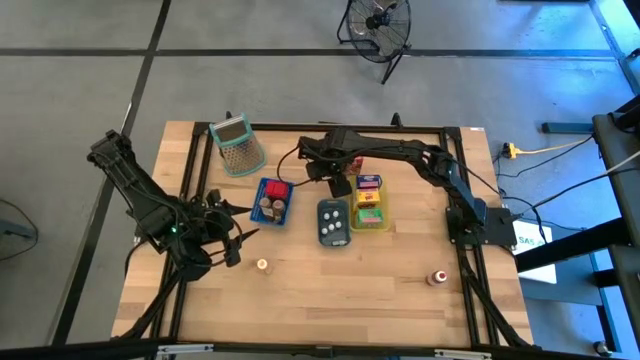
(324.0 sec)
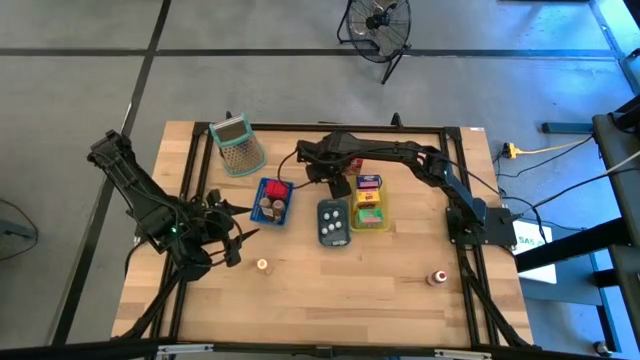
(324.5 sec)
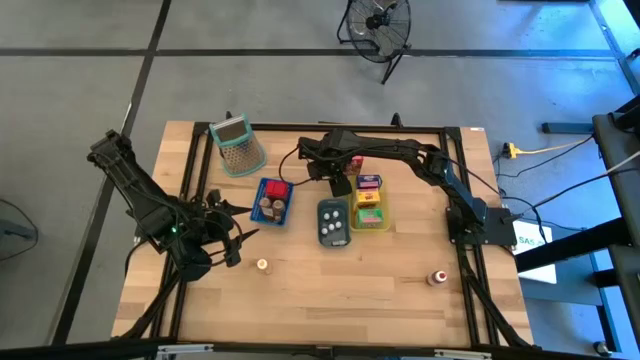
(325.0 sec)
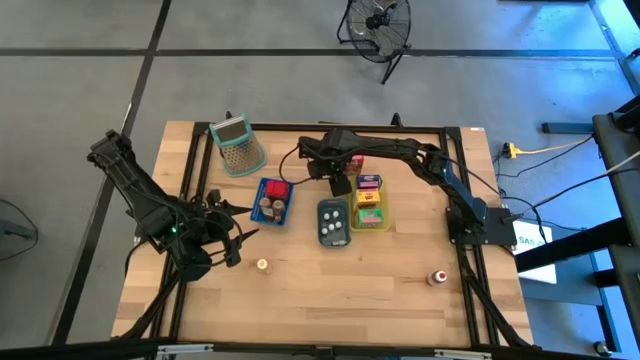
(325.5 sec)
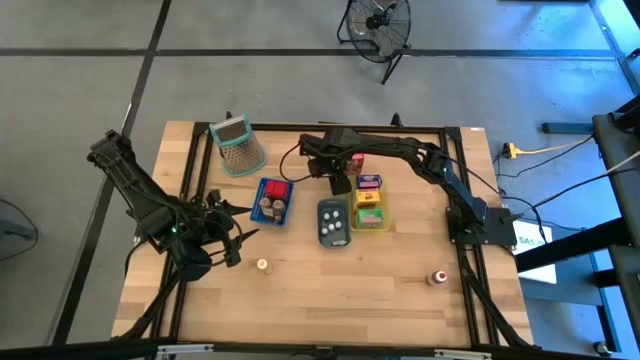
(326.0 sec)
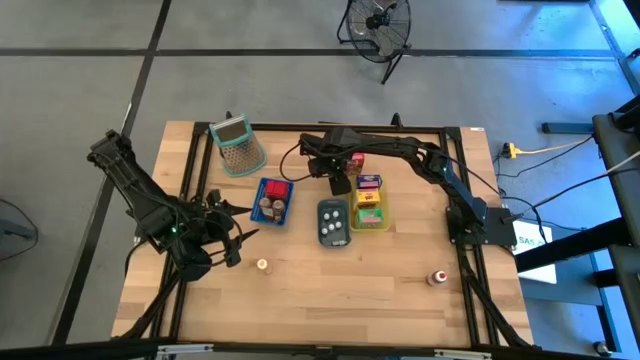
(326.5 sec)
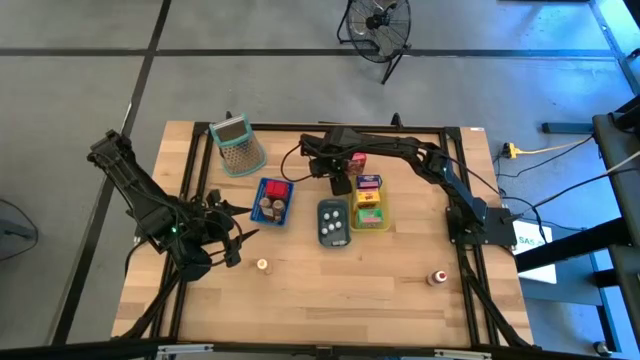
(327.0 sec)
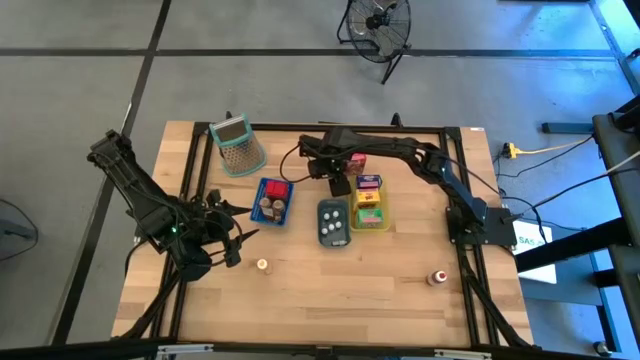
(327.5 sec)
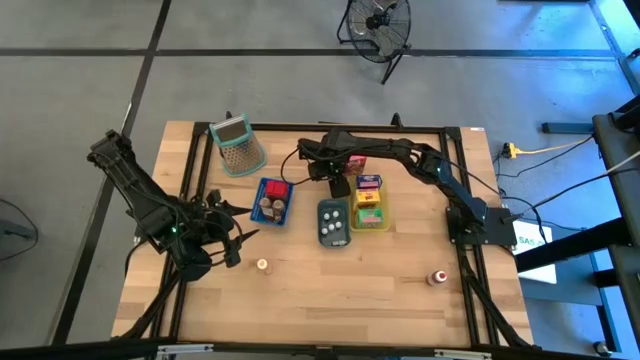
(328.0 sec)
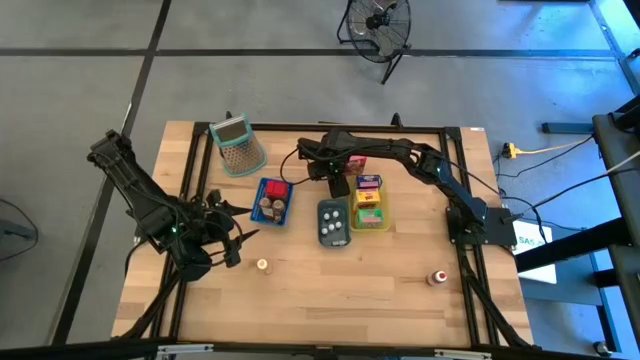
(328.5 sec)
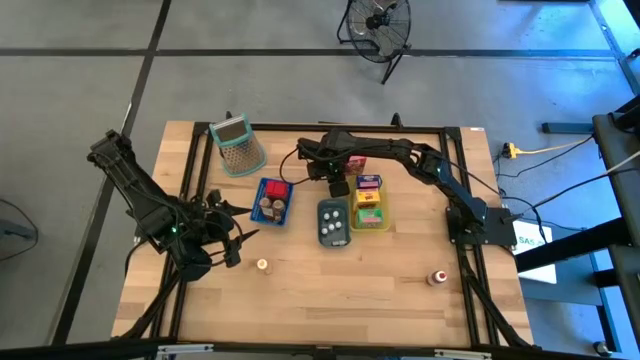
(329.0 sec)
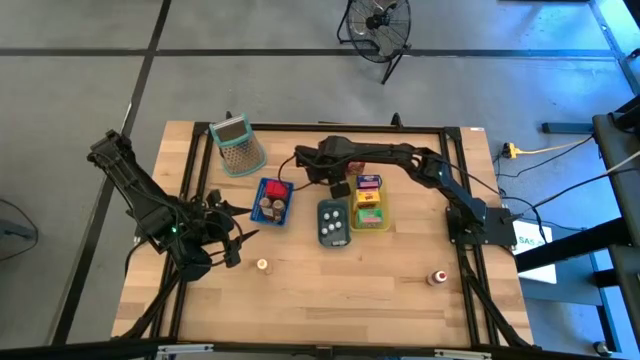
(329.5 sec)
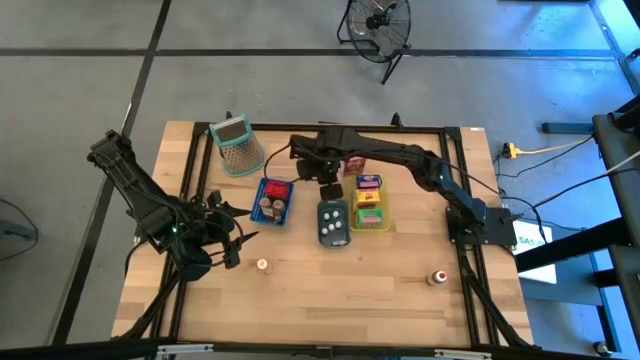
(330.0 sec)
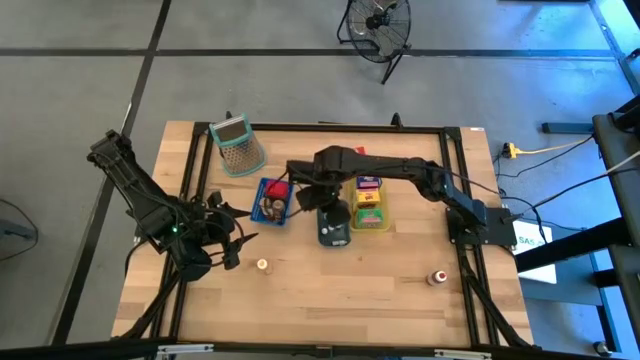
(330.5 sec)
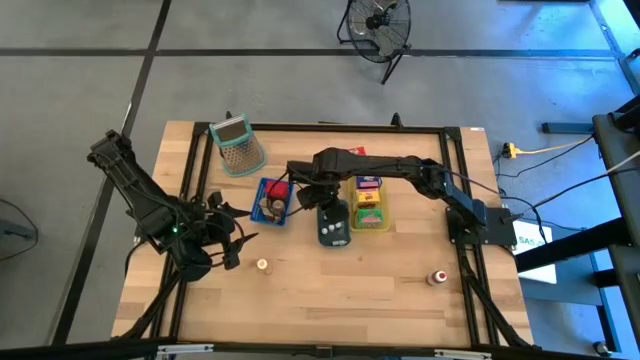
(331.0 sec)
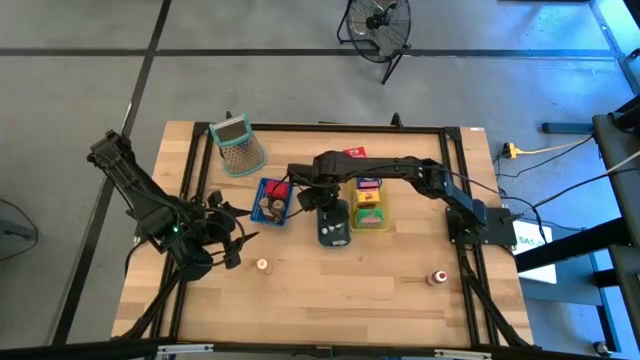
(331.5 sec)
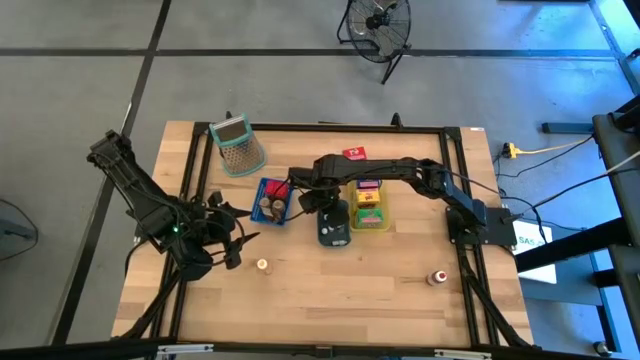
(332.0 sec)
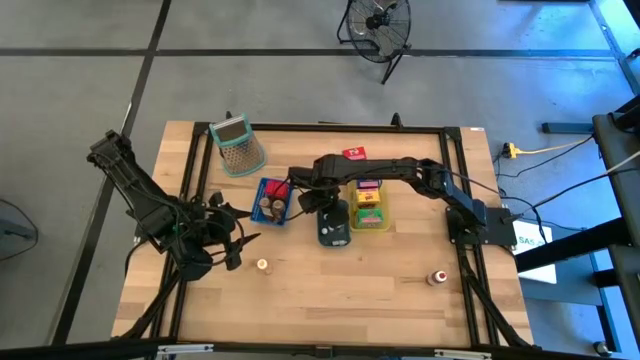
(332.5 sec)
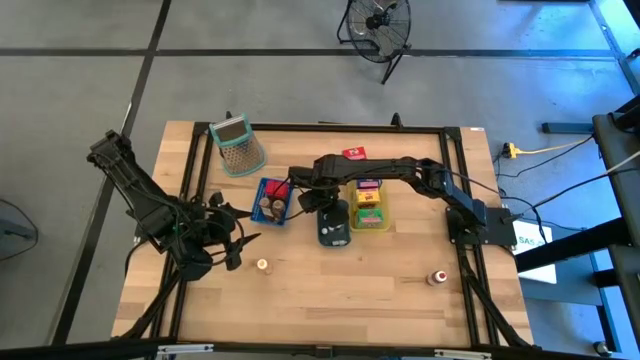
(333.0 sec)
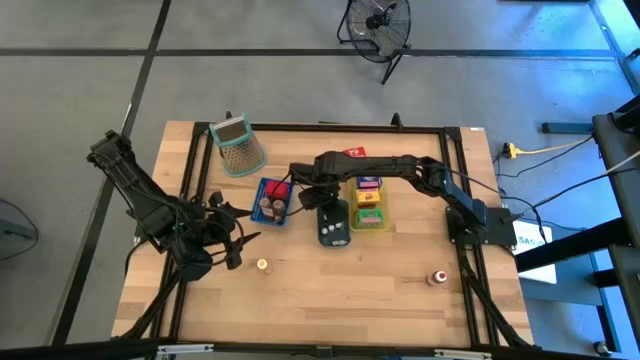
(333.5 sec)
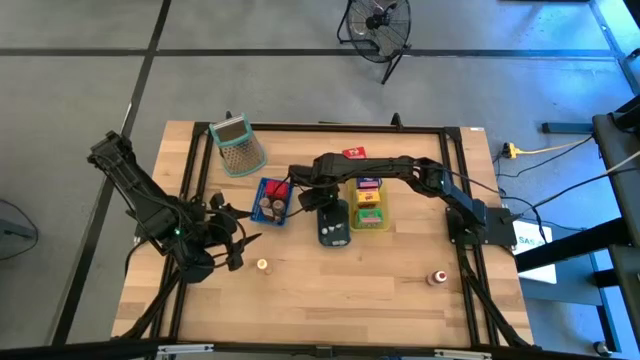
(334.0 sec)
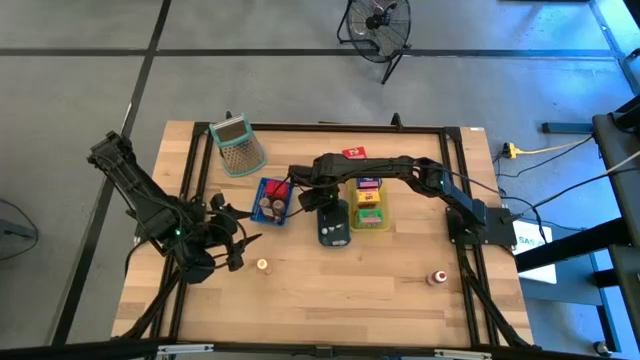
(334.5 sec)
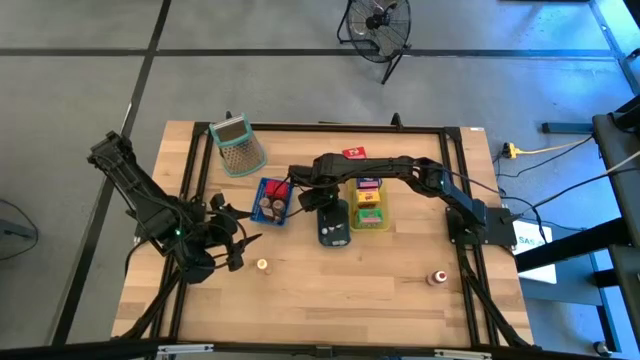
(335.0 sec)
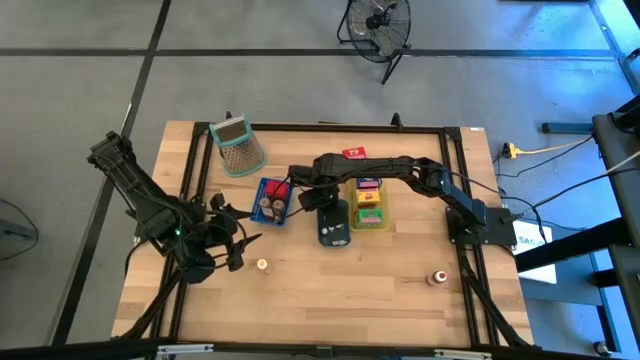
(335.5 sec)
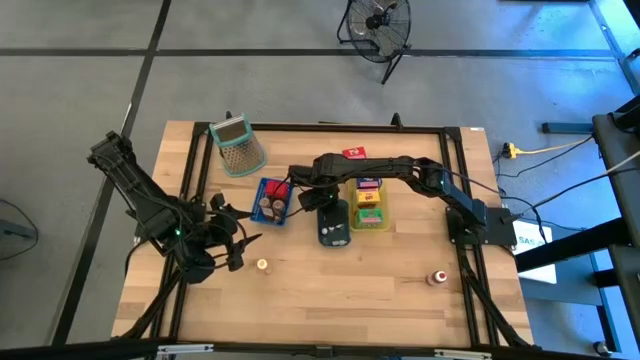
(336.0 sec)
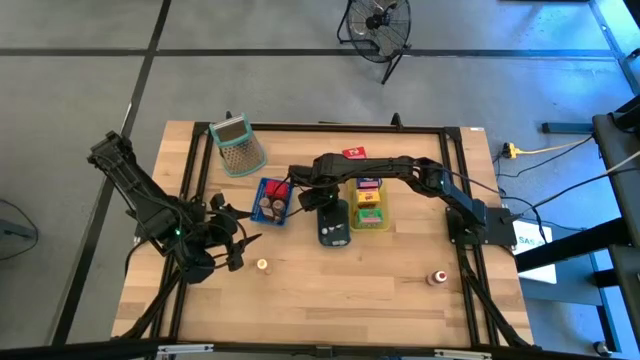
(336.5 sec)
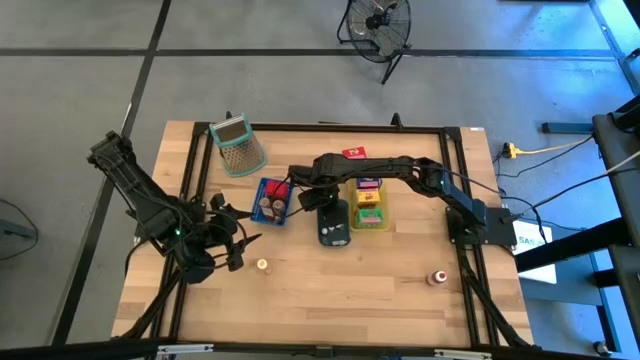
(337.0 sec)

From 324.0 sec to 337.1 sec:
Task: Pick & Place Kitchen Items
Put the small black food coloring into the green bin

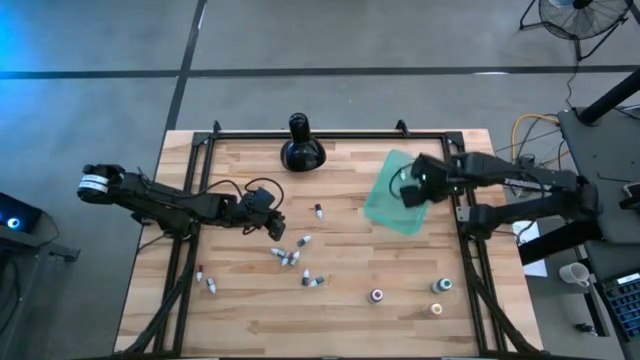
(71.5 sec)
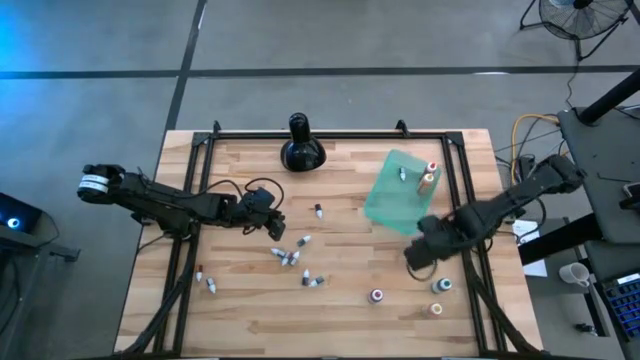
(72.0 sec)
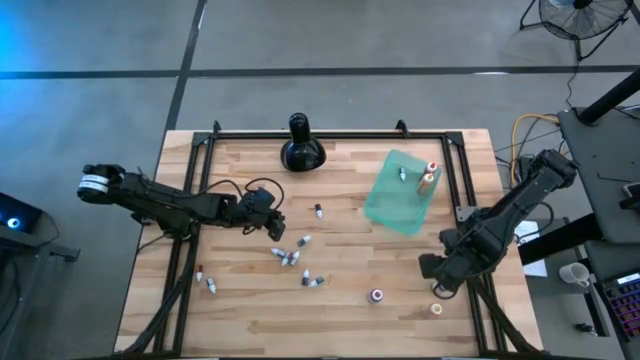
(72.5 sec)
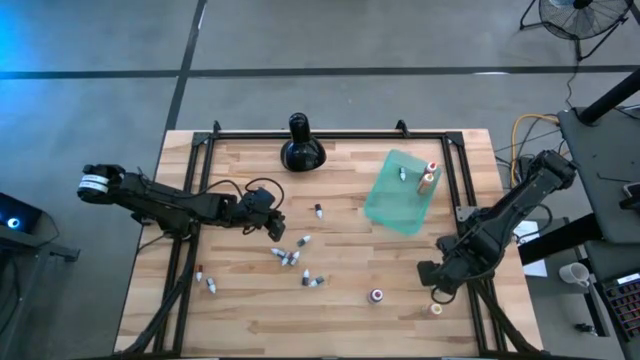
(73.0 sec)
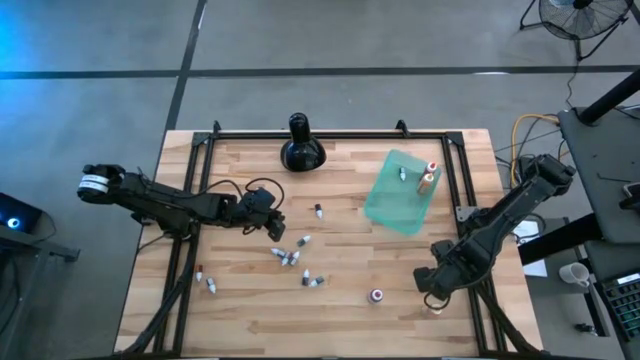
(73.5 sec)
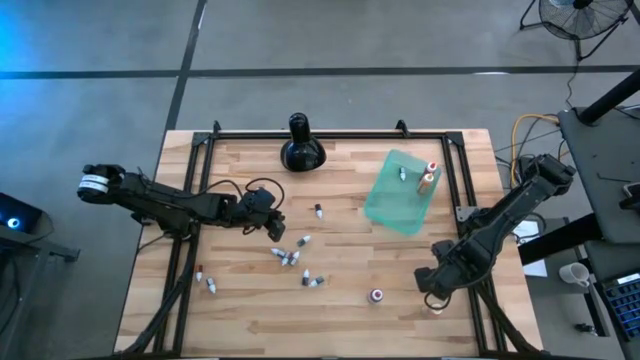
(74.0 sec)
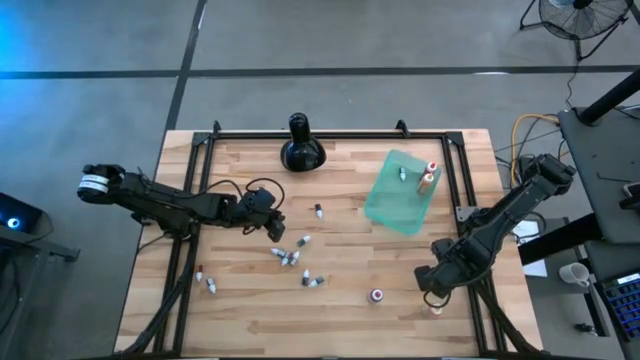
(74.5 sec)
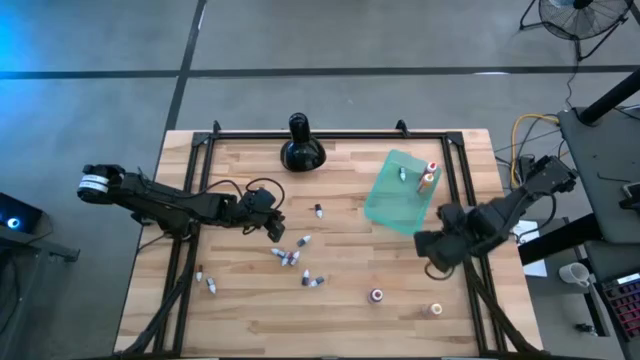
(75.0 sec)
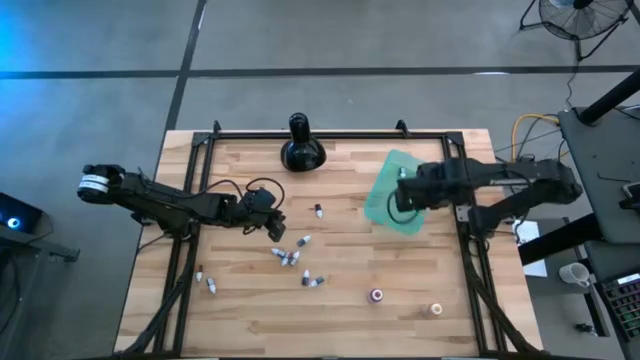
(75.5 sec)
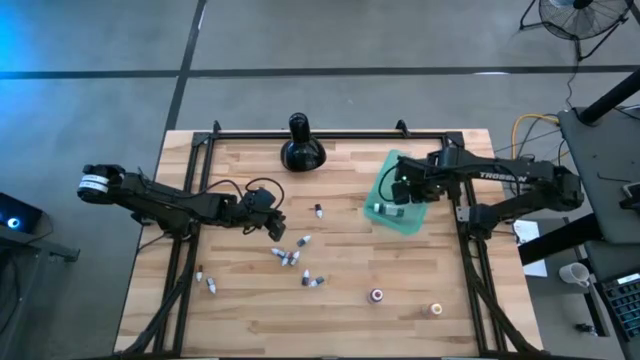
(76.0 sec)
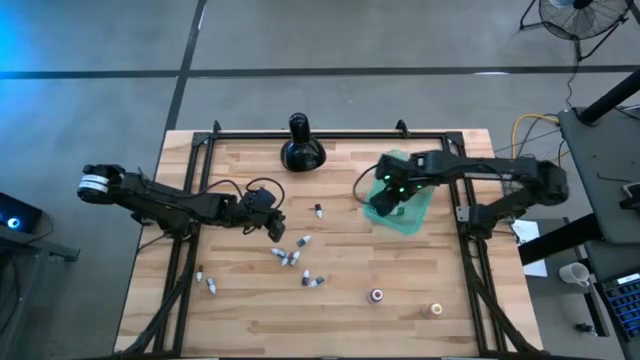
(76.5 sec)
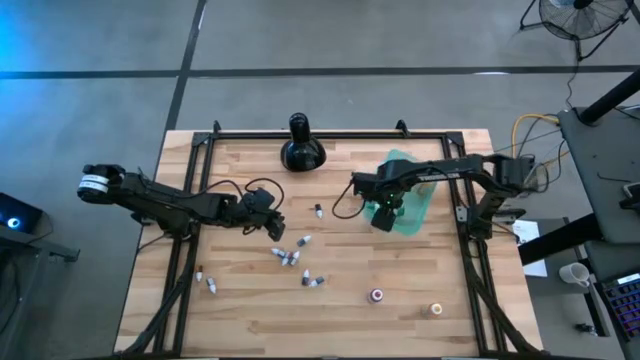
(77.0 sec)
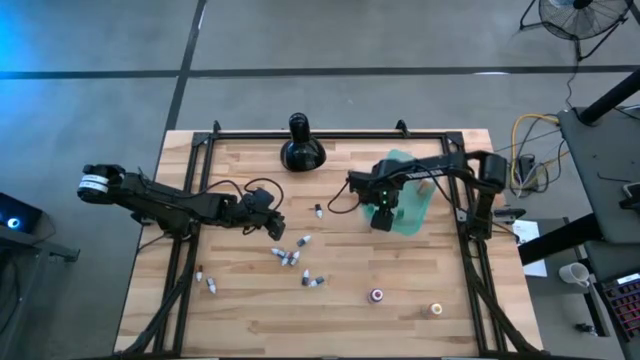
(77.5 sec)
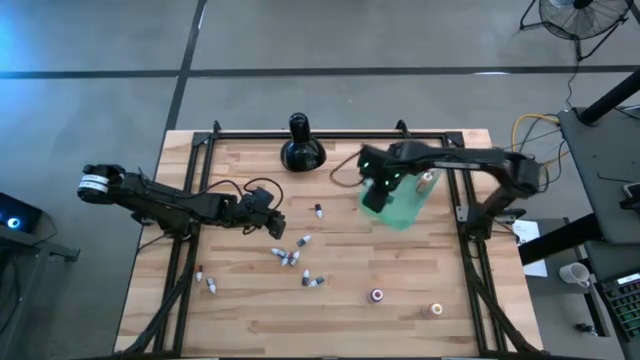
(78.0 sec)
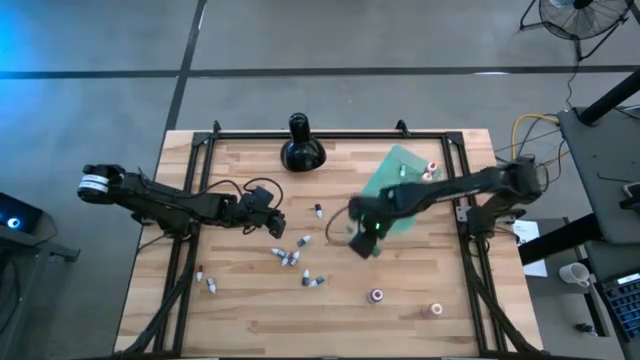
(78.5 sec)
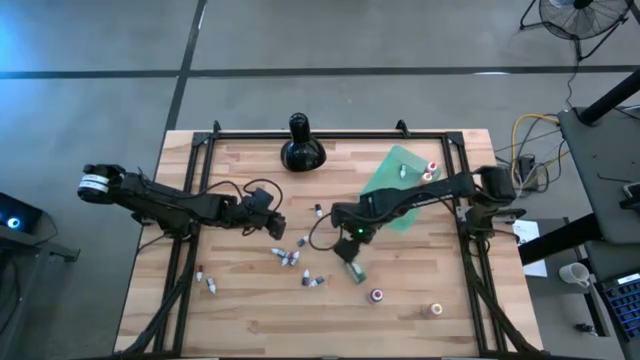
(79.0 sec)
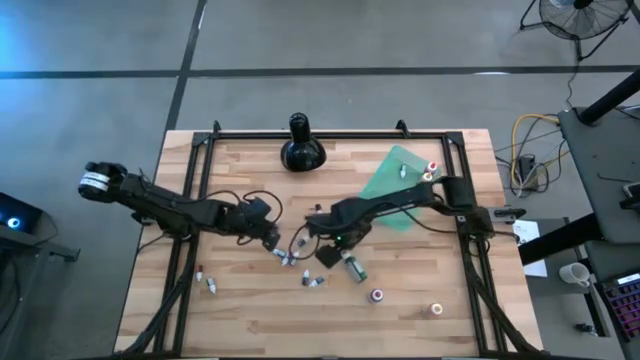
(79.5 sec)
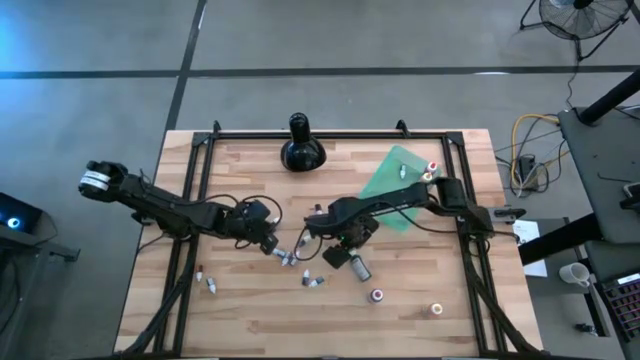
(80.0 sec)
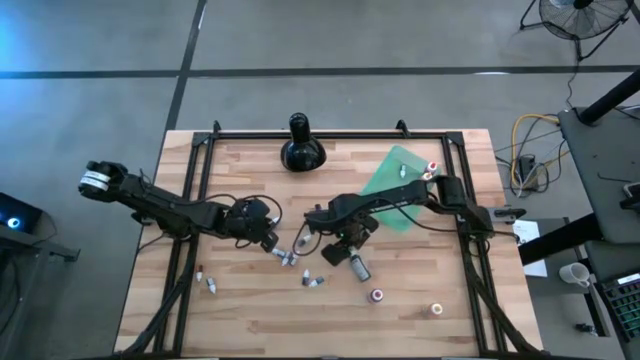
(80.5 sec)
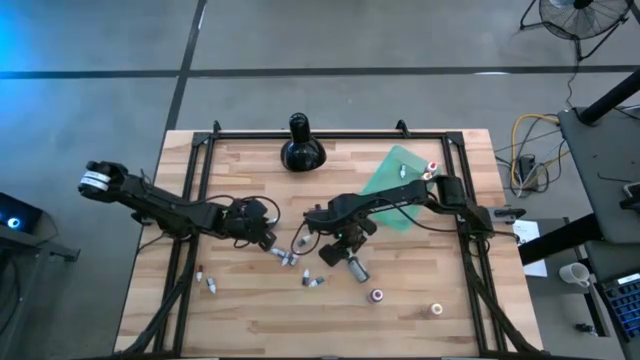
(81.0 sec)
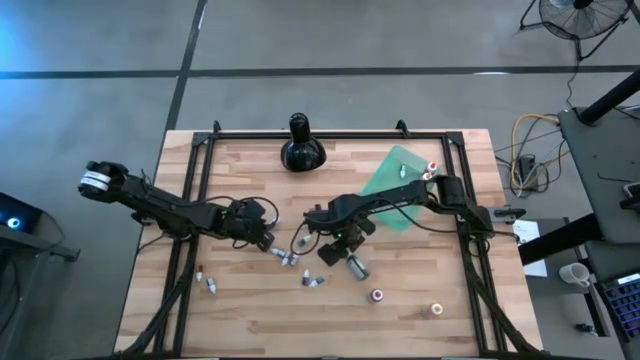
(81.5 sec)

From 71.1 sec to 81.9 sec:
Task: Pick & Place food coloring
Put the large green food coloring bottle into the green bin
